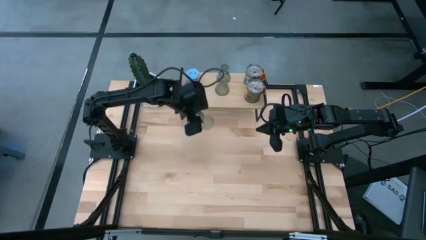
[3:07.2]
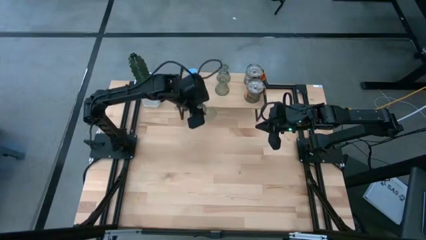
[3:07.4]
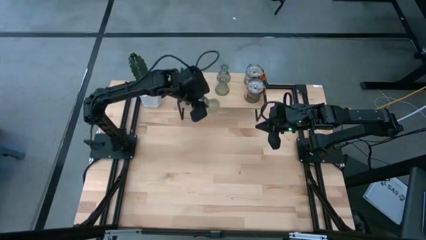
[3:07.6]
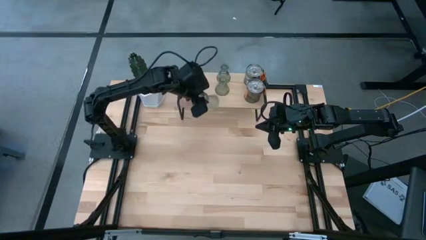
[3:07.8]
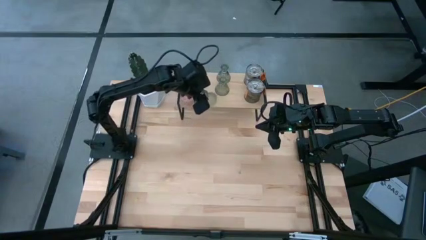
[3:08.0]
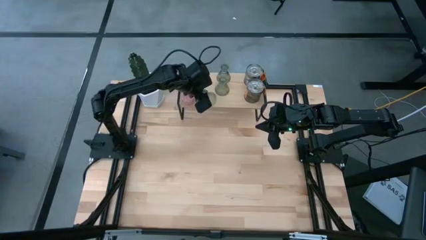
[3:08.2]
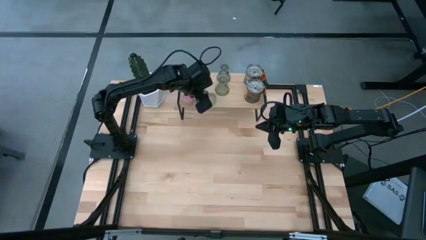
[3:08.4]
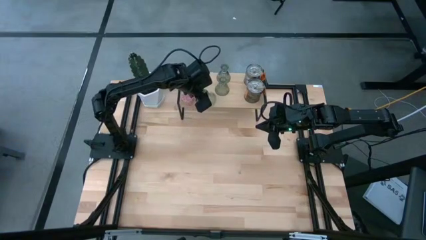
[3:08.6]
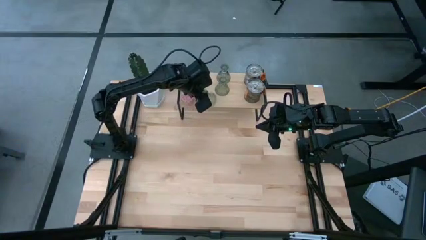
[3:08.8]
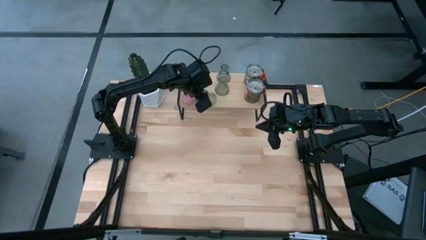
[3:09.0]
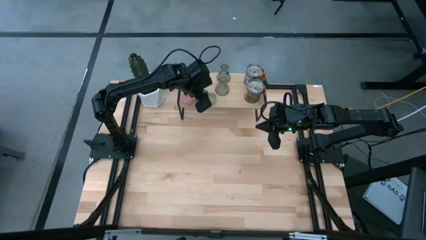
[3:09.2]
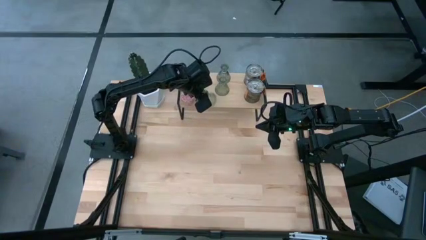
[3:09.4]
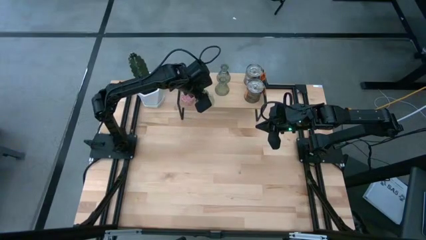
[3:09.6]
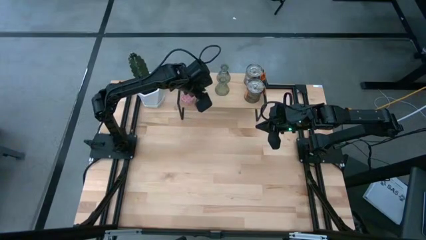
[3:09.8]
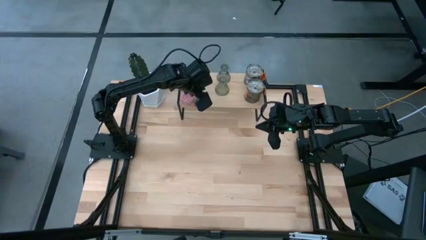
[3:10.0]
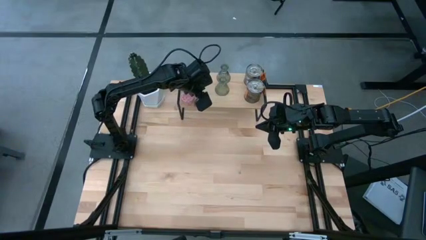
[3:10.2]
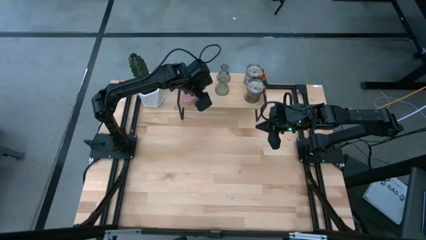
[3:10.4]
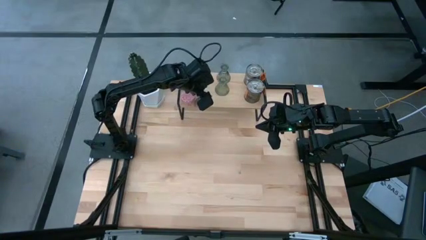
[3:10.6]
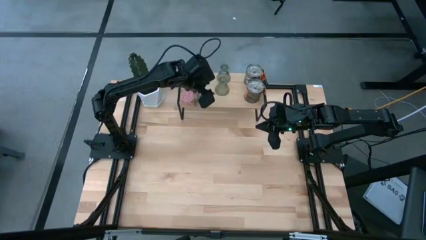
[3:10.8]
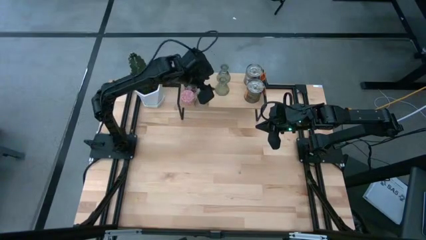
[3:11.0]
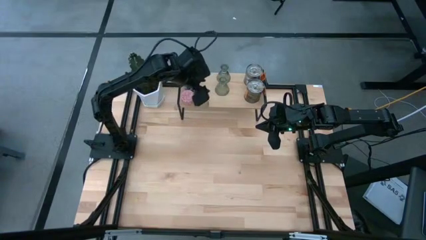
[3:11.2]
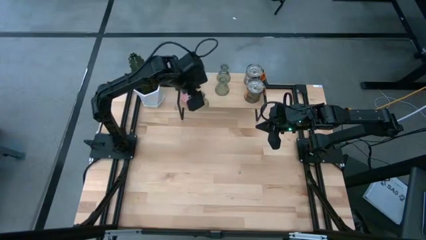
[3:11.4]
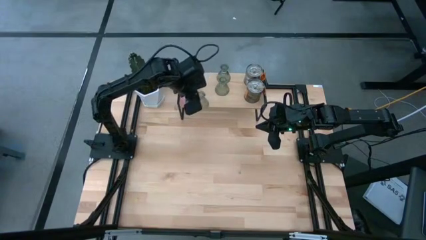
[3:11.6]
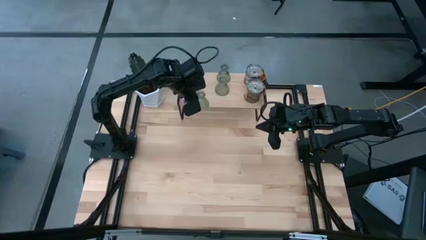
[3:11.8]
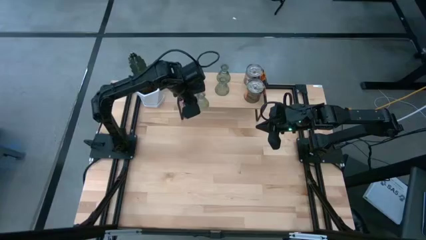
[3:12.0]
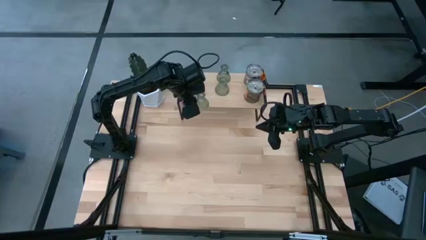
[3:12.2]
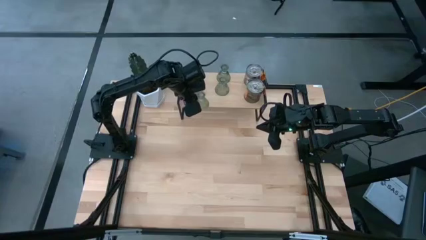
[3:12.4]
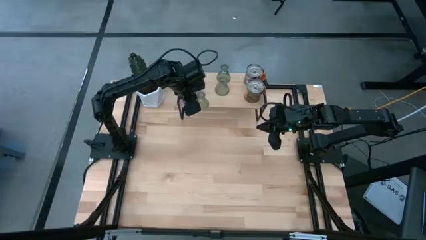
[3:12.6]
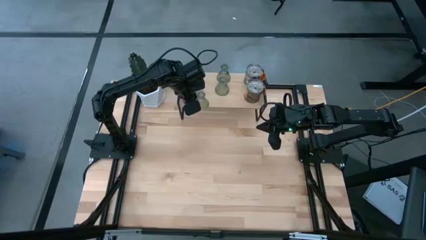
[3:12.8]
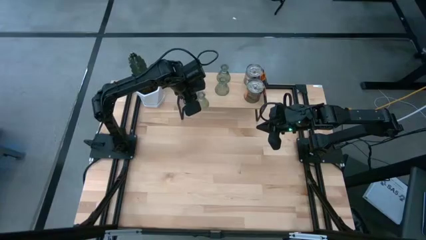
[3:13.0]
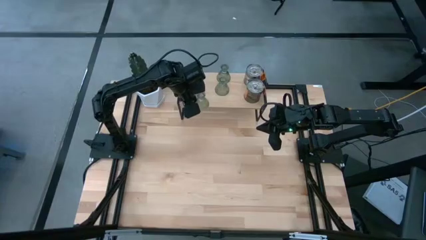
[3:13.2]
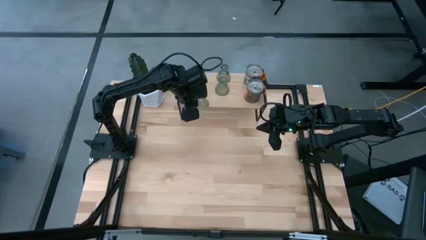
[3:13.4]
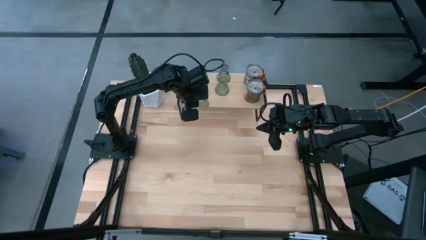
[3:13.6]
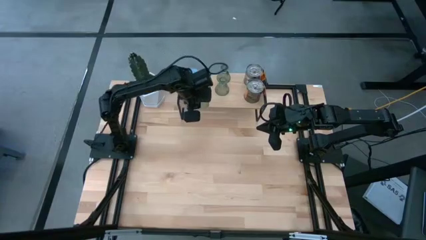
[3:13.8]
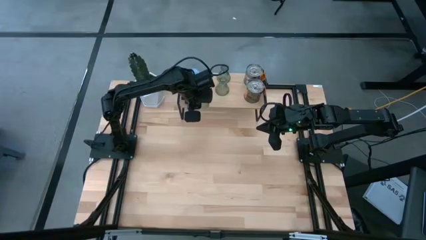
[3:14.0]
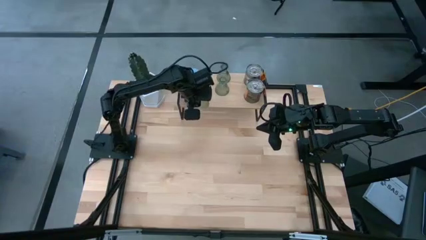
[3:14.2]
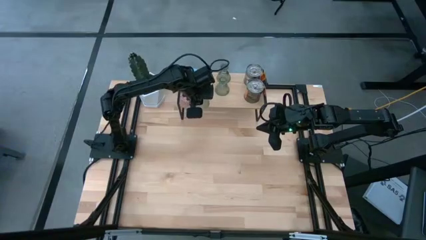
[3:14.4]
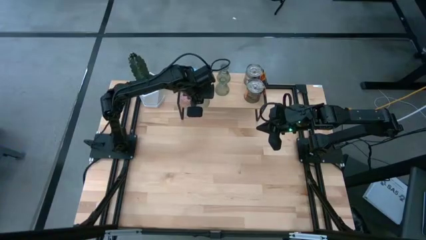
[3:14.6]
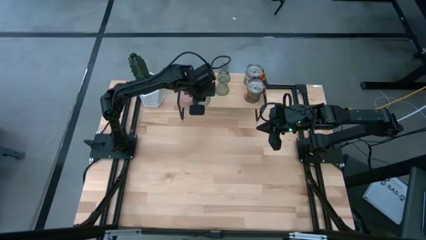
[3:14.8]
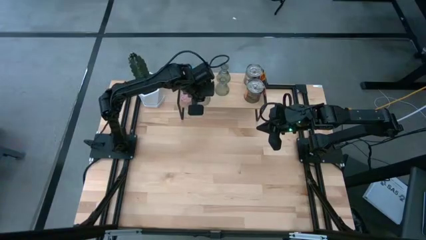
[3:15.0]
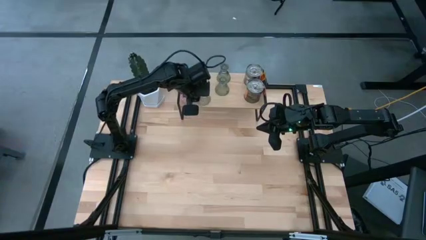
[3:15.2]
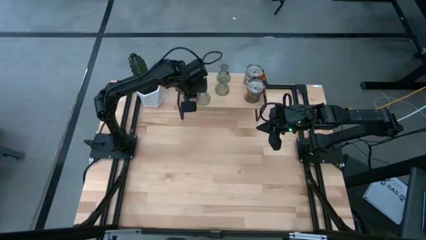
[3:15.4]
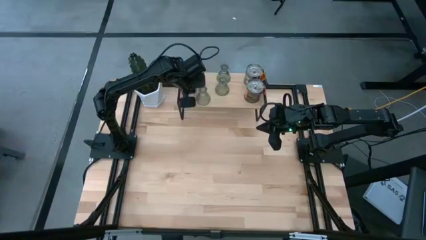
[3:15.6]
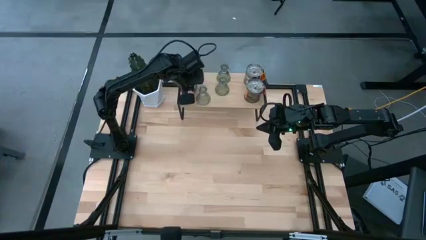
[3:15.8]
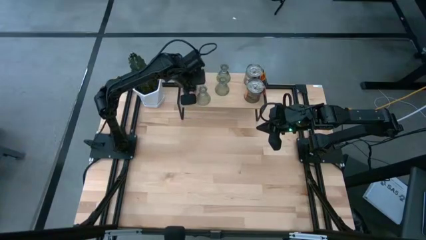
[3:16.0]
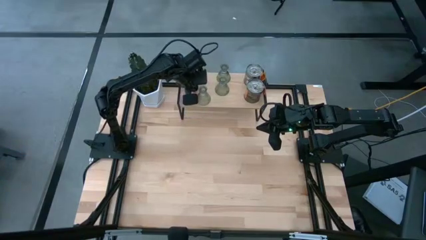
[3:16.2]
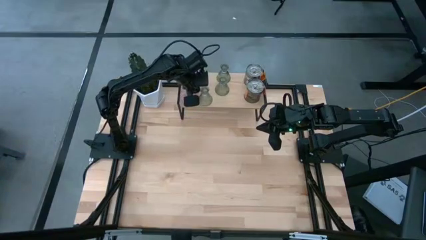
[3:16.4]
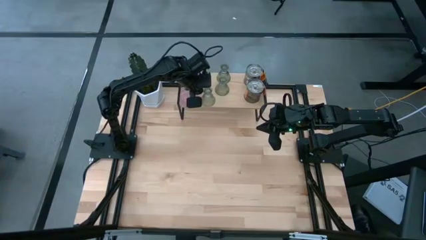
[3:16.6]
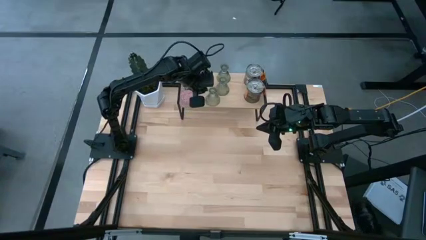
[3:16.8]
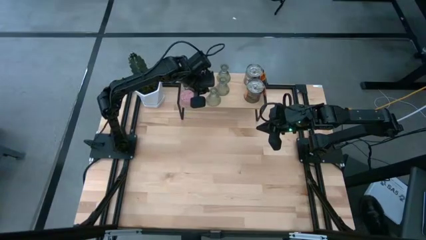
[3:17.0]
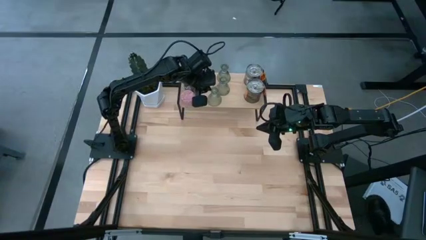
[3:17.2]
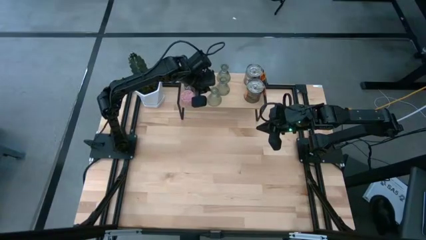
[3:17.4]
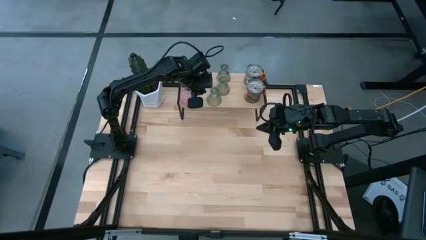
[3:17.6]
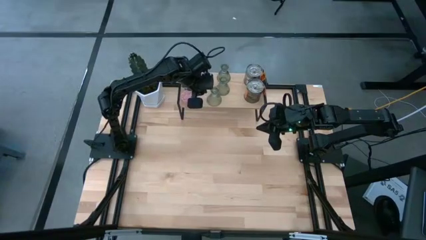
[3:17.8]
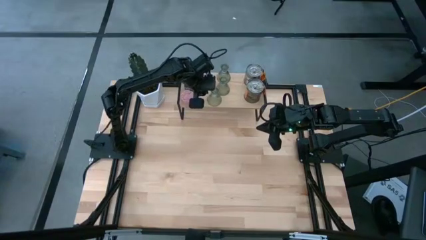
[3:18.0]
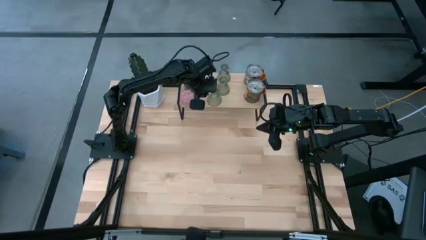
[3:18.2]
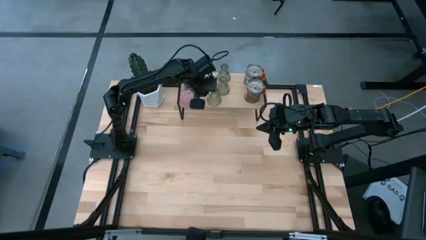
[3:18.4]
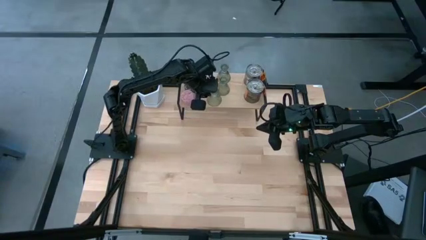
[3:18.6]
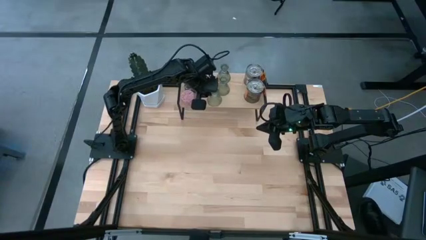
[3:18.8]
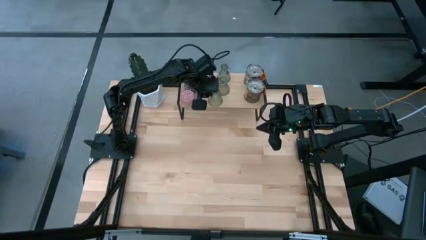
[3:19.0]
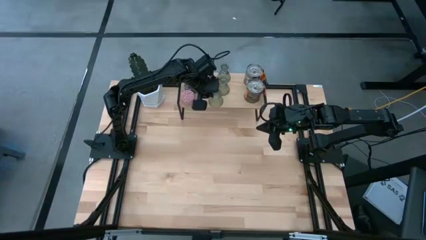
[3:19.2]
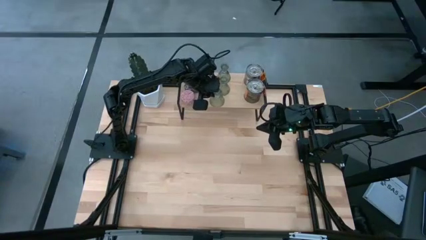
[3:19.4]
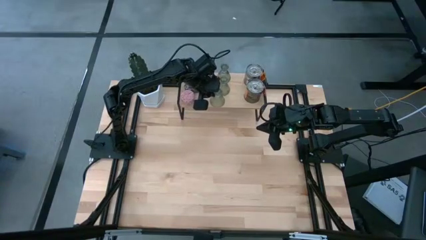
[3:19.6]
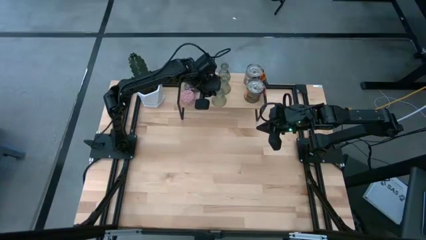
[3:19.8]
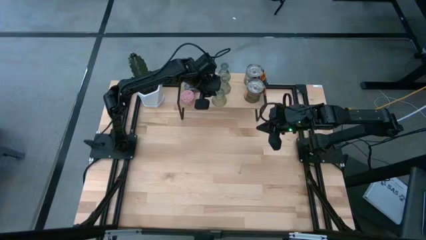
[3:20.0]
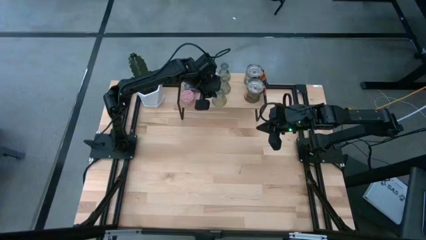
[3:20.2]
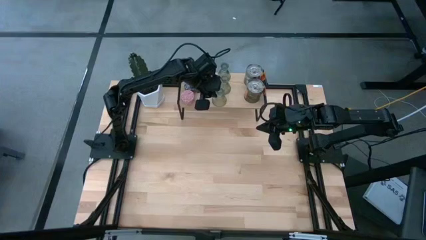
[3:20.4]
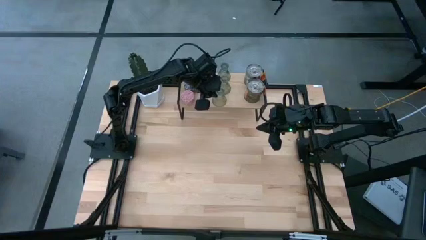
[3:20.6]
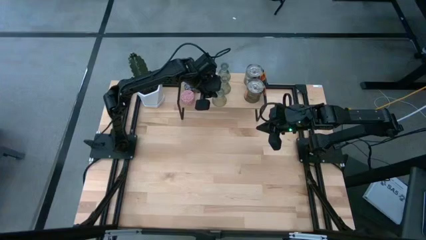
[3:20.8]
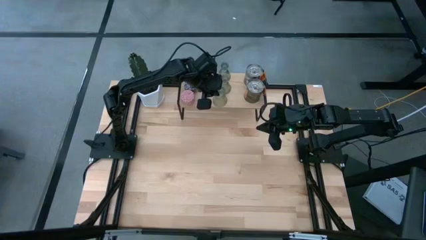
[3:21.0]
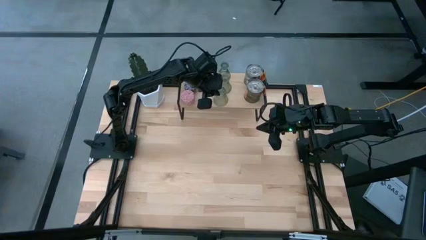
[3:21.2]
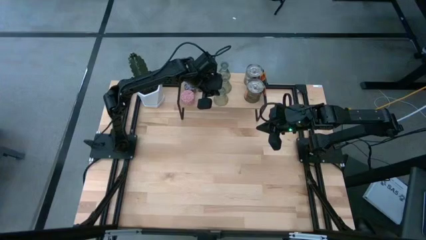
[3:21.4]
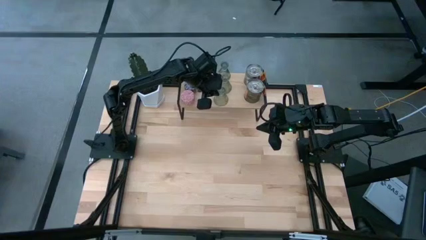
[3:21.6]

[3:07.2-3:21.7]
Task: Pick & Place candle stick holders
Put the green glass candle holder aligned with the other green glass candle holders on the shelf
